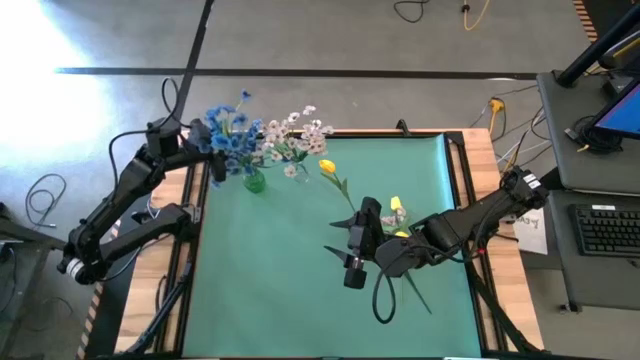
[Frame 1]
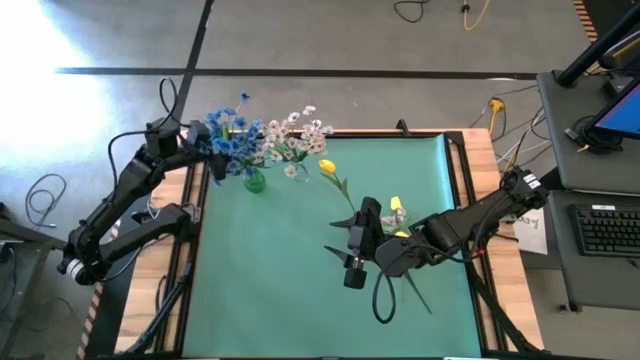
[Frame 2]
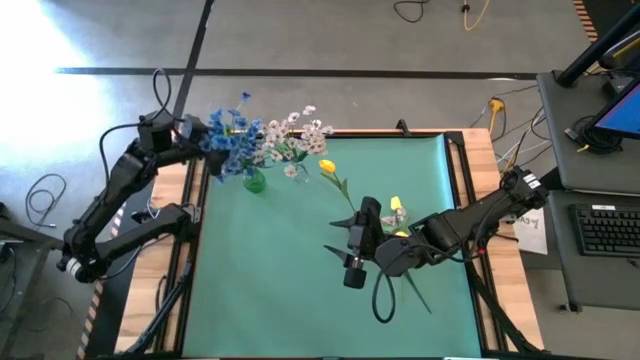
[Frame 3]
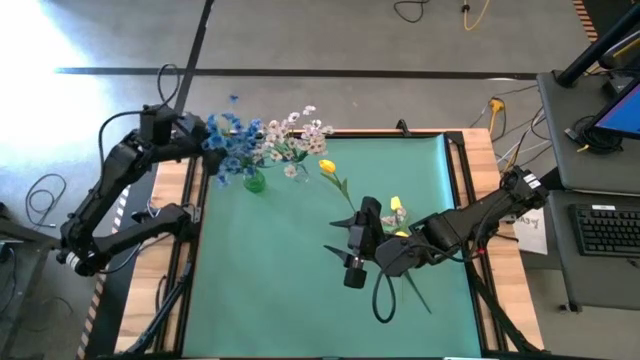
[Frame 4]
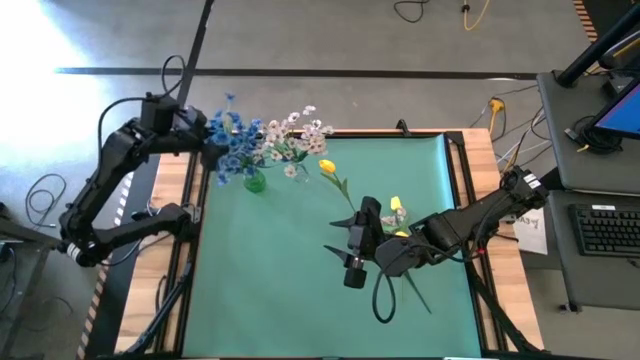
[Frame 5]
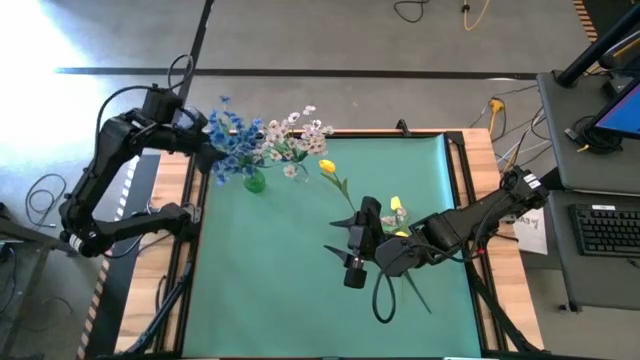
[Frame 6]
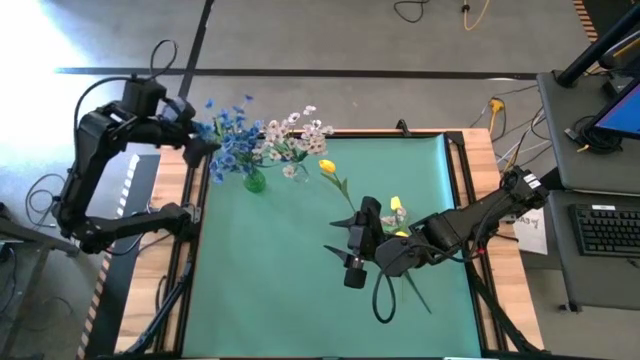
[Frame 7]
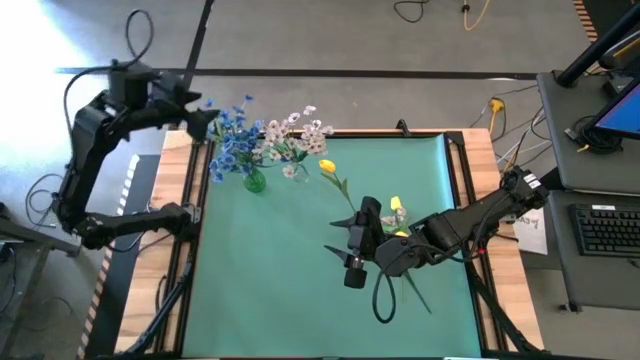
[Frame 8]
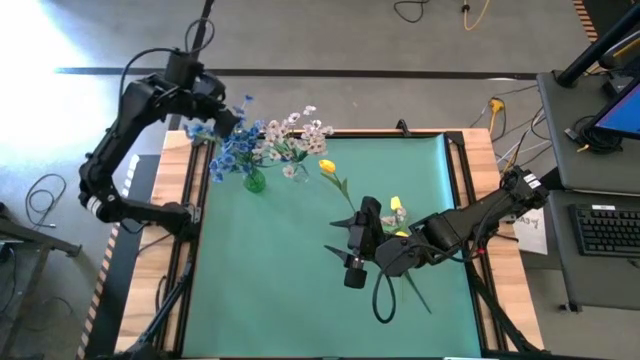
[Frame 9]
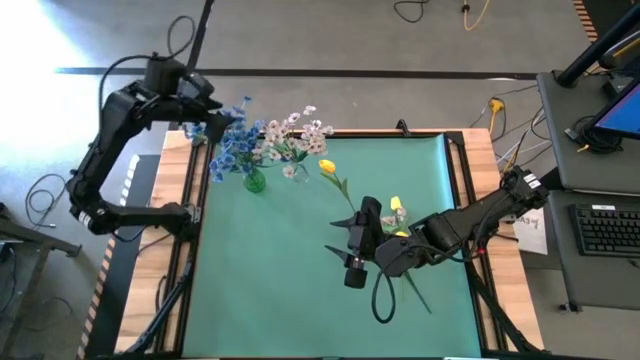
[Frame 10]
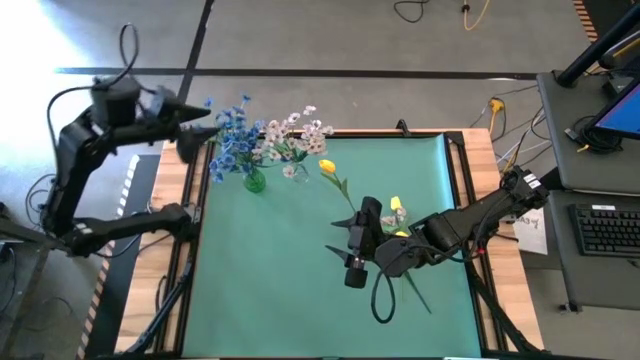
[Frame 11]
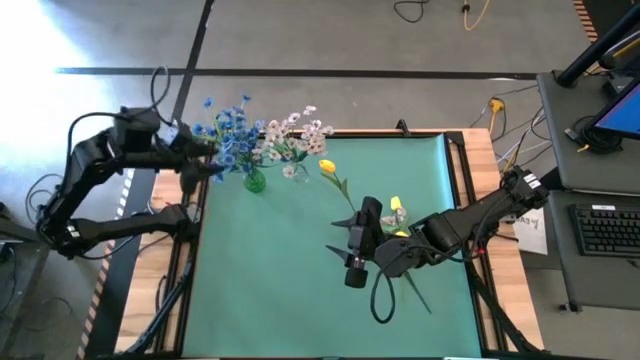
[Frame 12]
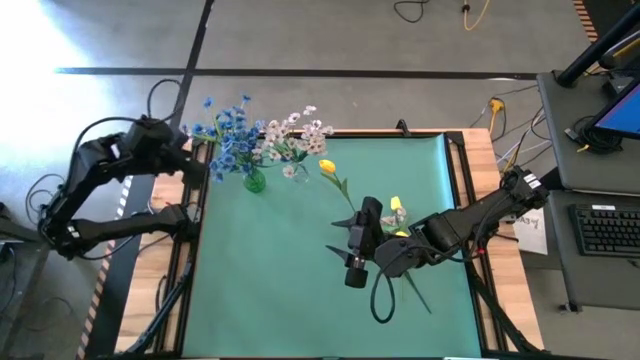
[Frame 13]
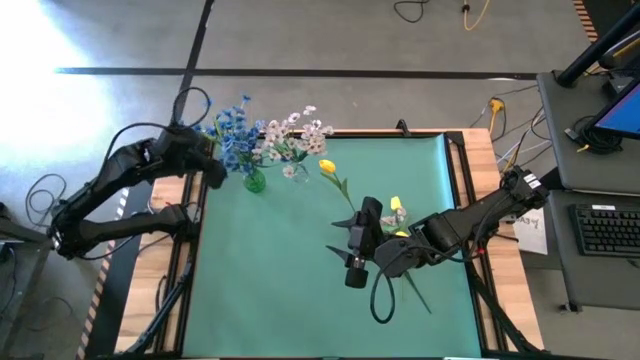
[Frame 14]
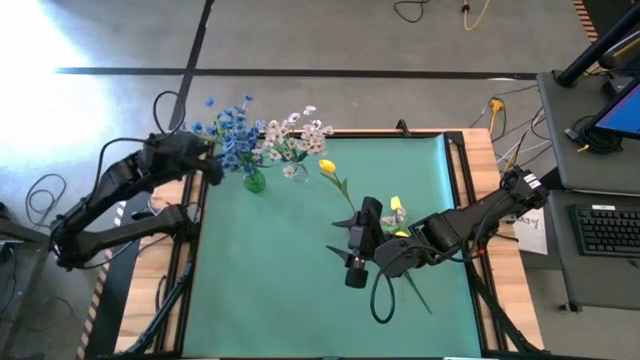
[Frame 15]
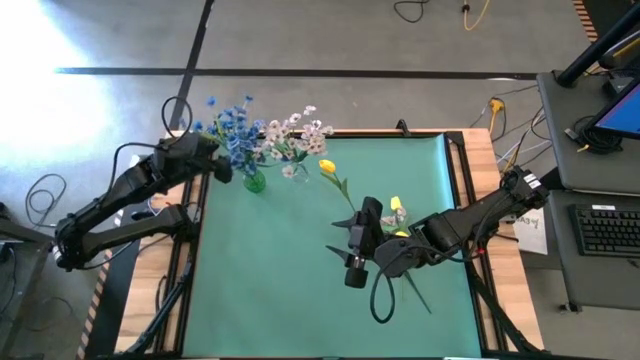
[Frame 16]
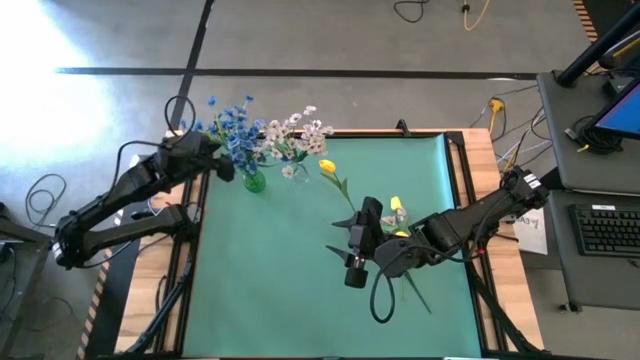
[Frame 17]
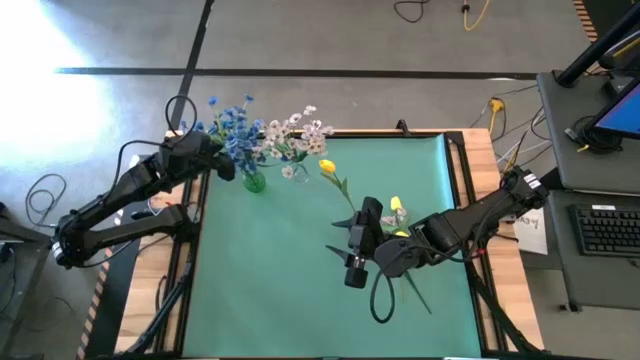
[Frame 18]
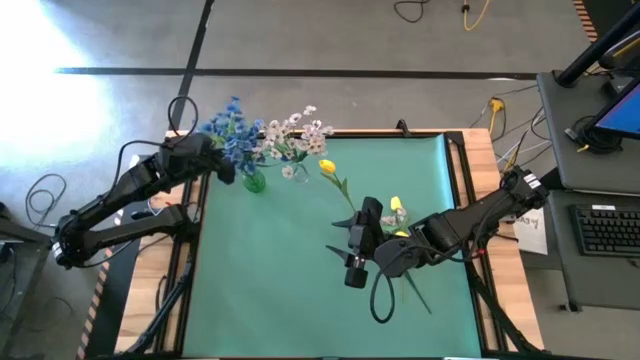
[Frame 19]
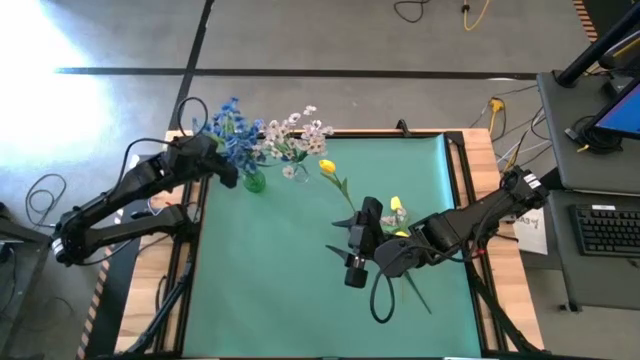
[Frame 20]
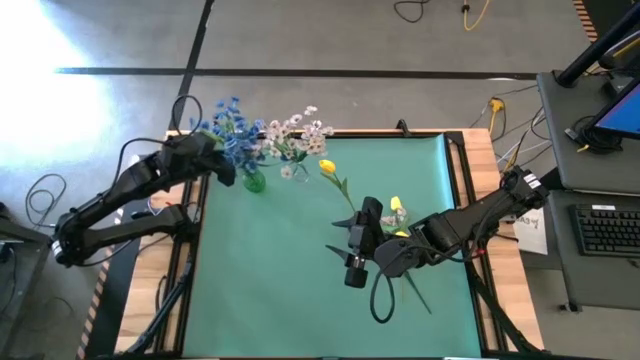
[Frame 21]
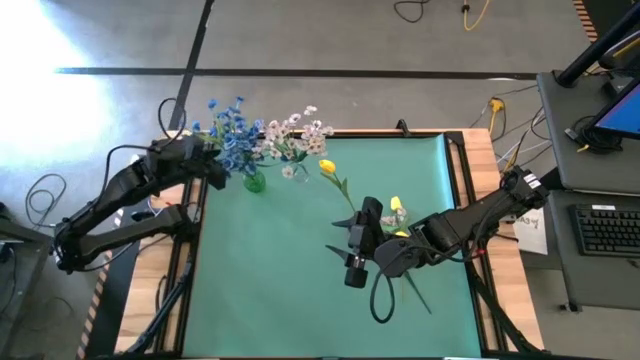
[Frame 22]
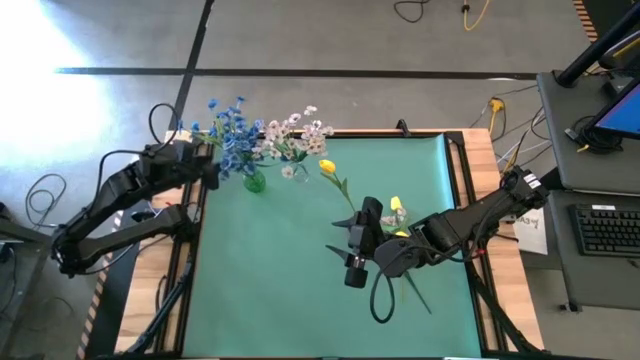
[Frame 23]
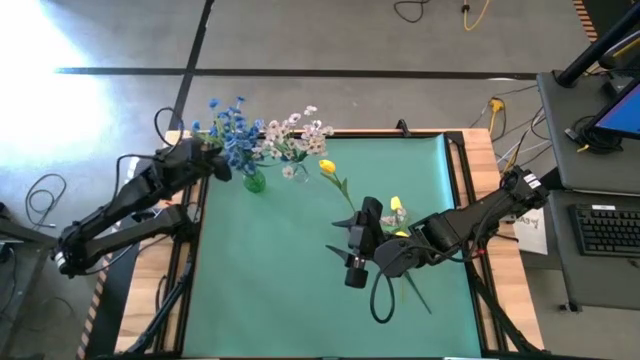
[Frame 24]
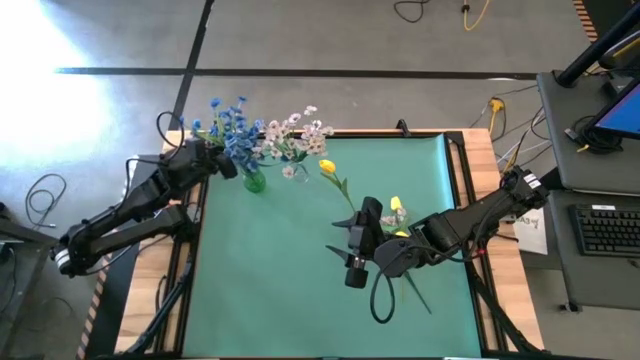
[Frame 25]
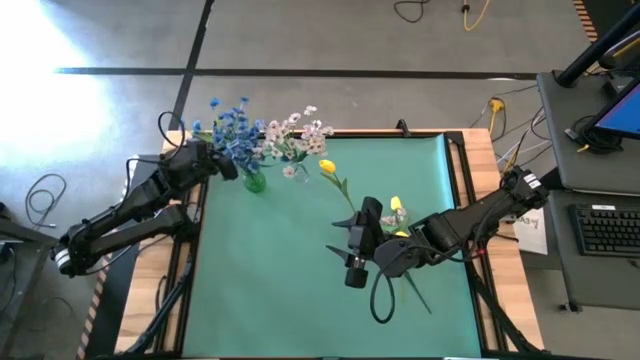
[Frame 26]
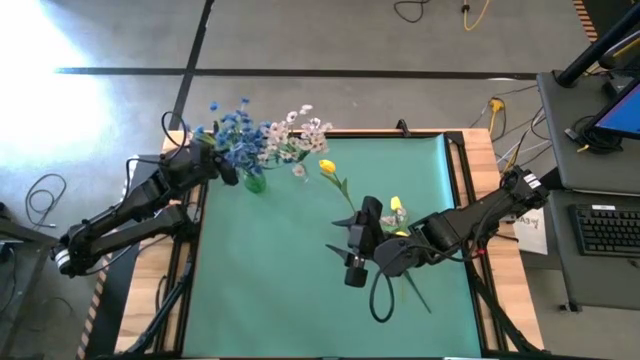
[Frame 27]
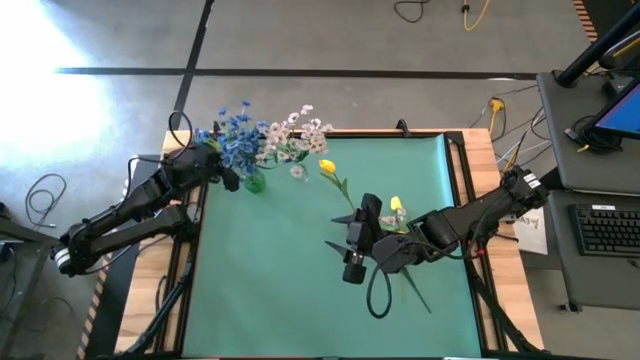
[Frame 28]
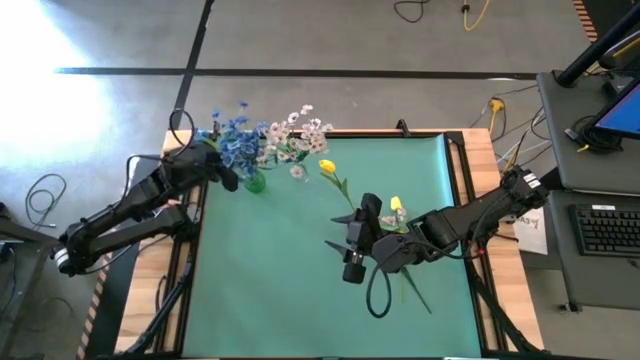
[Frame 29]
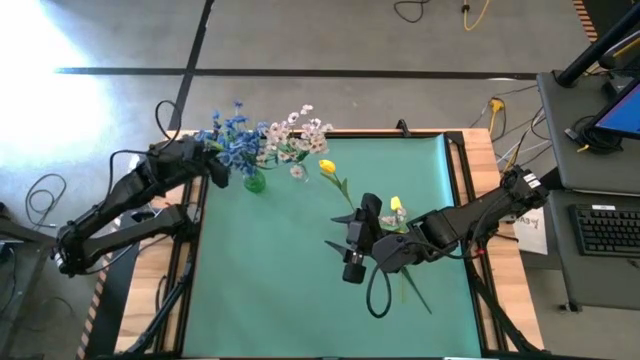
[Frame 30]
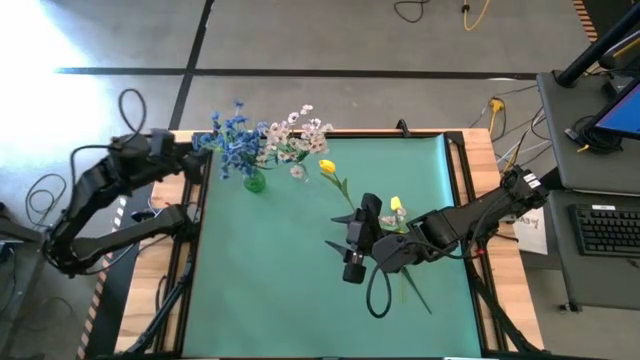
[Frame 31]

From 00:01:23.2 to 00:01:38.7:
Task: Sort flowers into vase by color
Put the blue flowers into the green vase

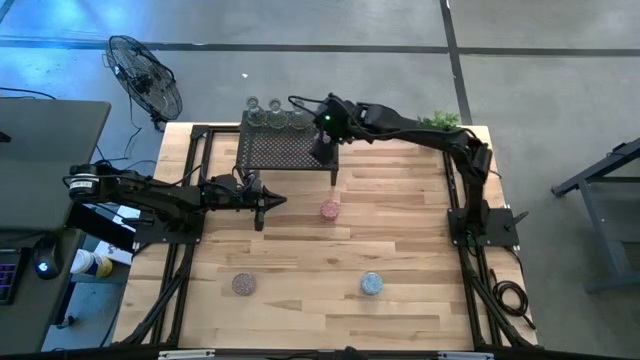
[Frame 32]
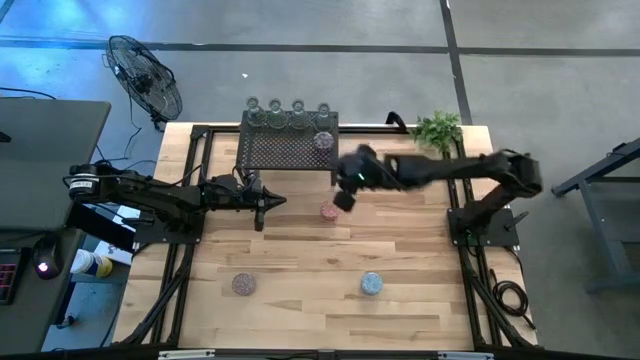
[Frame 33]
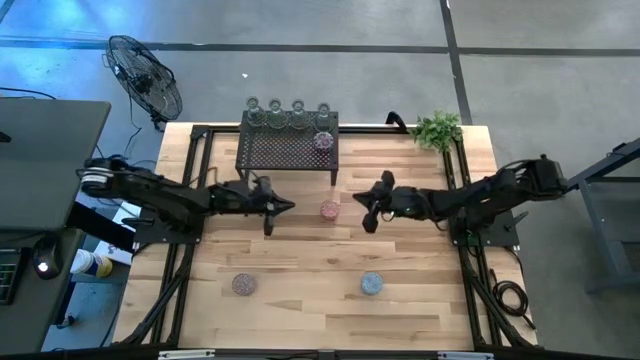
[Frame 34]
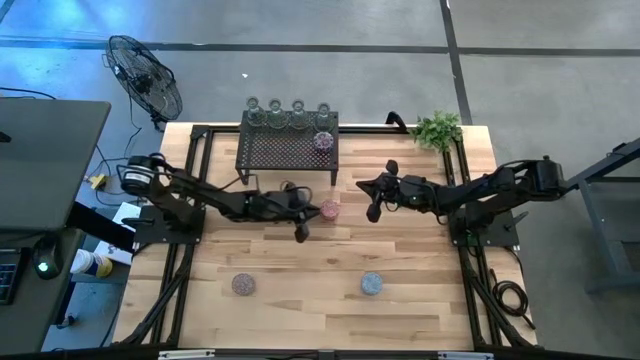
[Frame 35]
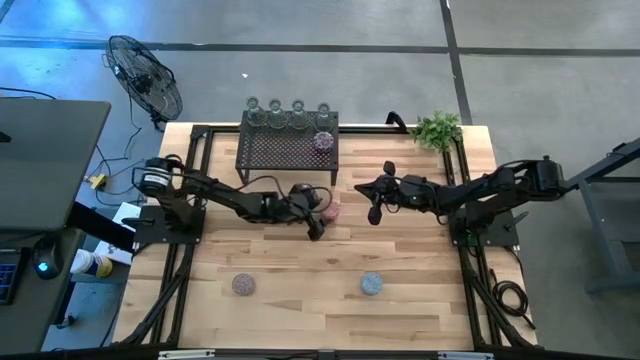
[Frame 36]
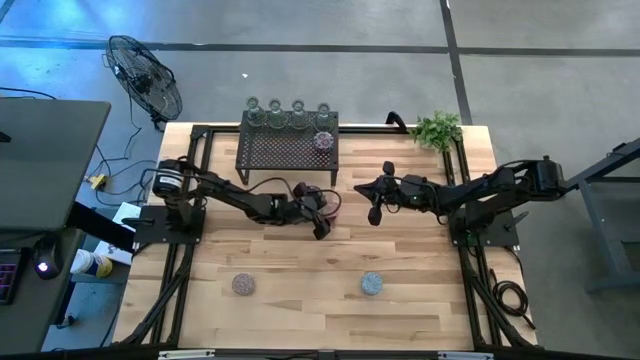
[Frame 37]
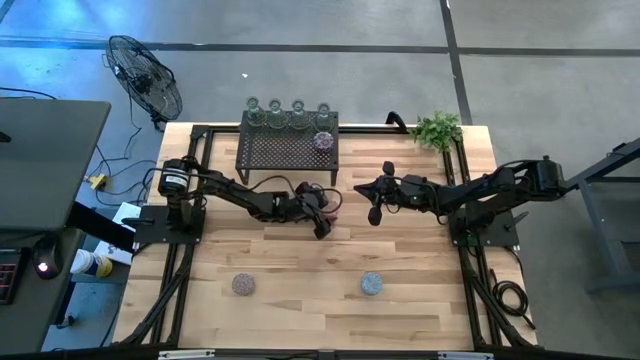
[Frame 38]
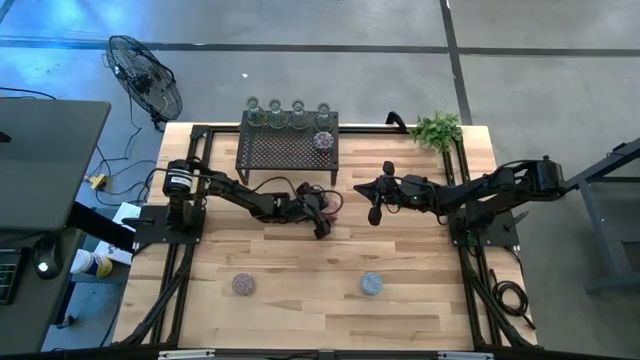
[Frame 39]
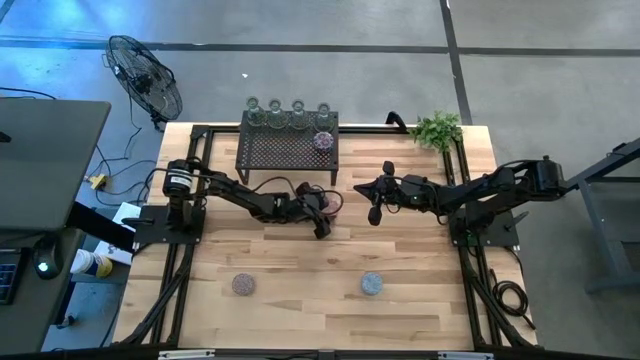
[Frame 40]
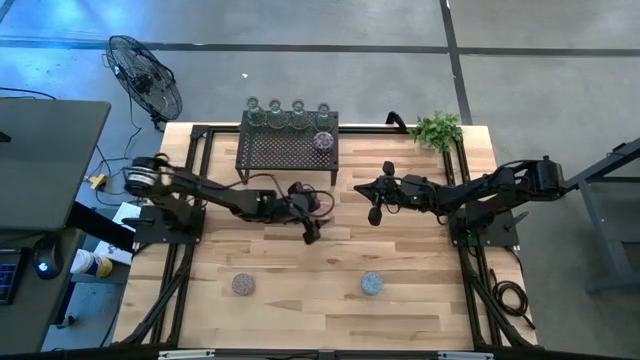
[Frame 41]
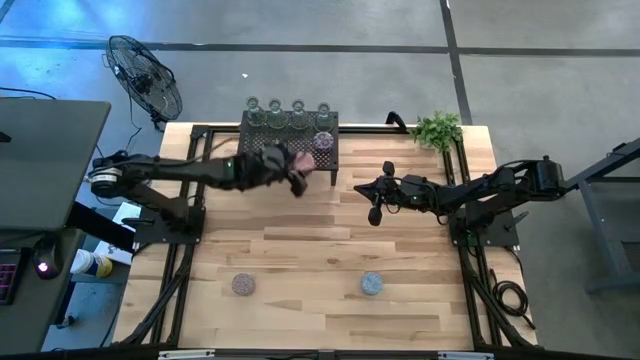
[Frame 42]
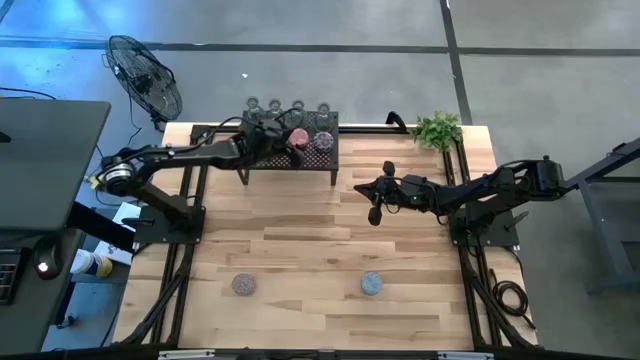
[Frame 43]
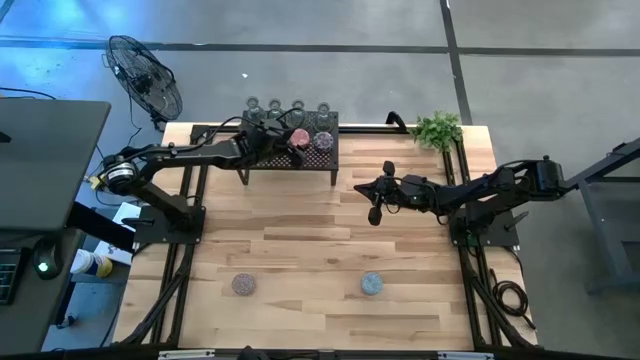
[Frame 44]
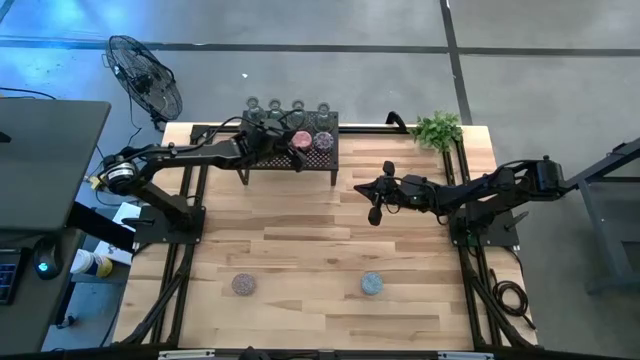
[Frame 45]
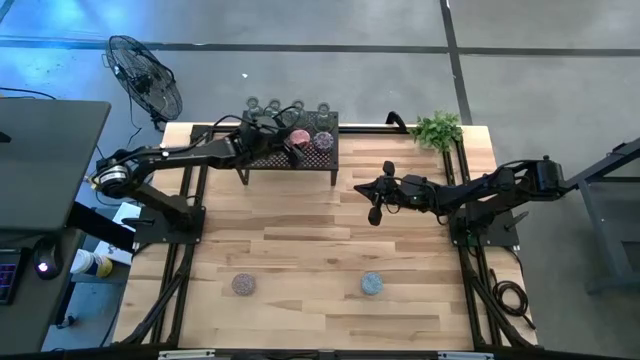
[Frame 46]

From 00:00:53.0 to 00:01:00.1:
Task: Pick & Place candle stick holders
Put the pink scented candle on the shelf
